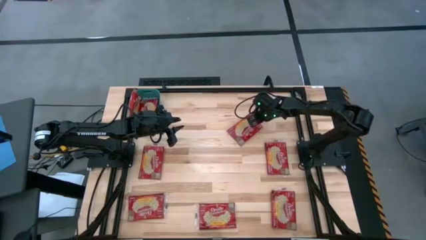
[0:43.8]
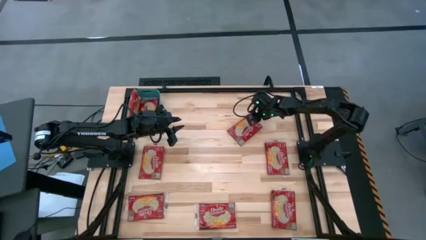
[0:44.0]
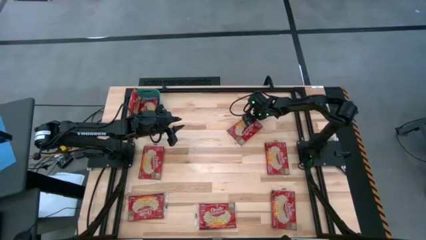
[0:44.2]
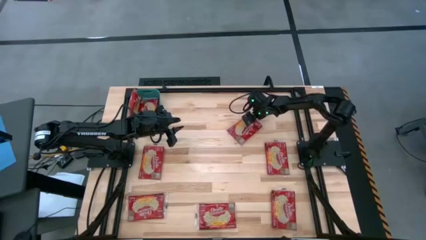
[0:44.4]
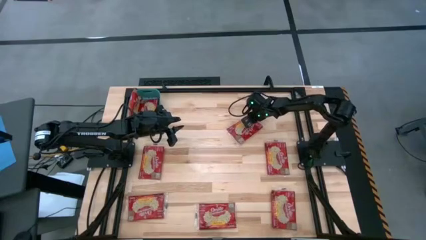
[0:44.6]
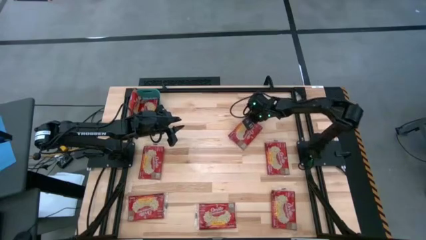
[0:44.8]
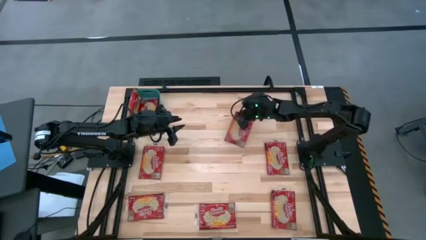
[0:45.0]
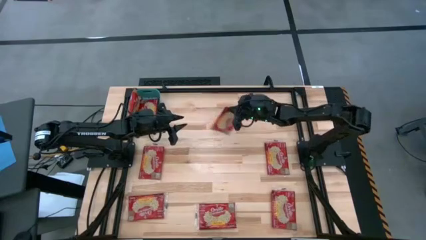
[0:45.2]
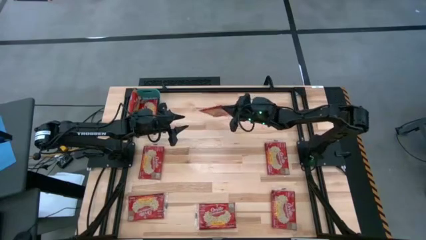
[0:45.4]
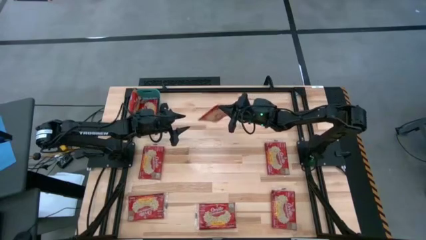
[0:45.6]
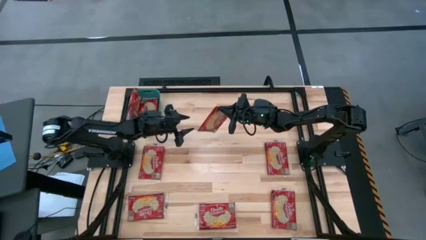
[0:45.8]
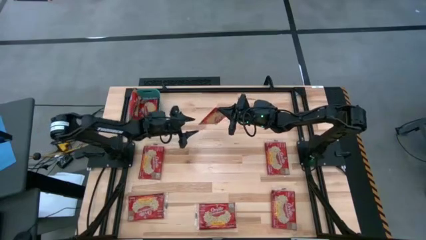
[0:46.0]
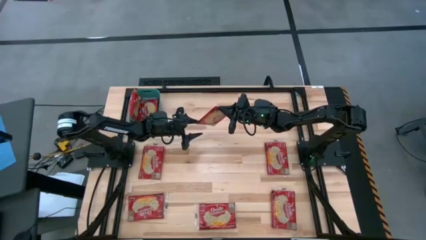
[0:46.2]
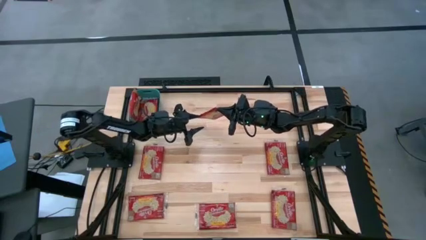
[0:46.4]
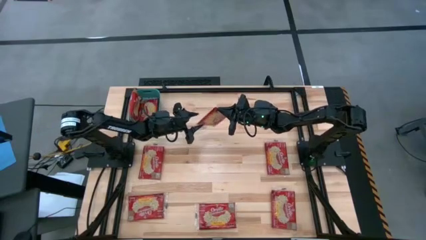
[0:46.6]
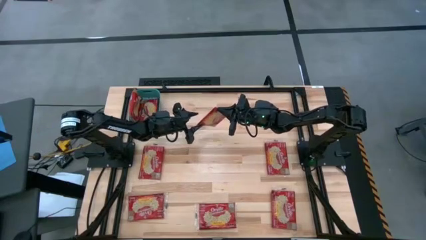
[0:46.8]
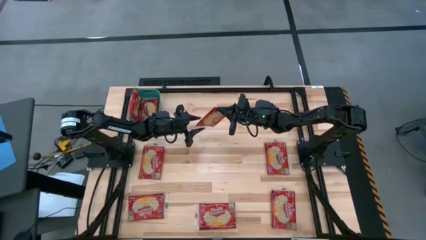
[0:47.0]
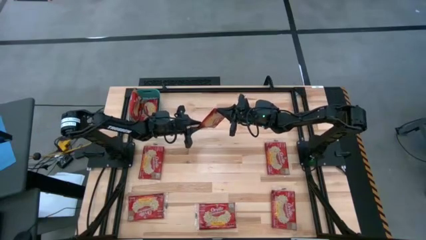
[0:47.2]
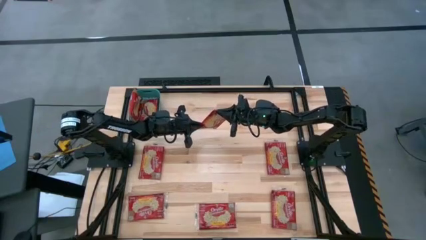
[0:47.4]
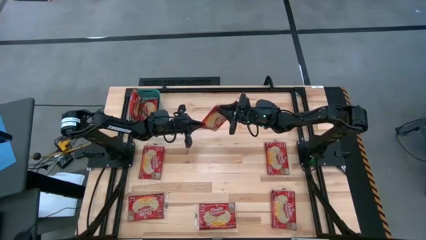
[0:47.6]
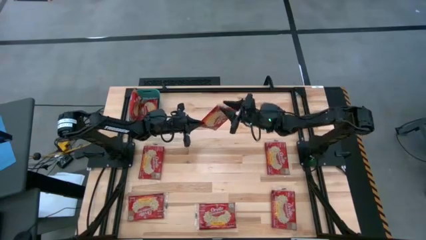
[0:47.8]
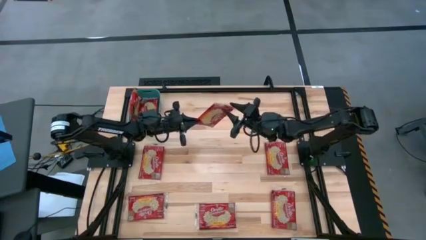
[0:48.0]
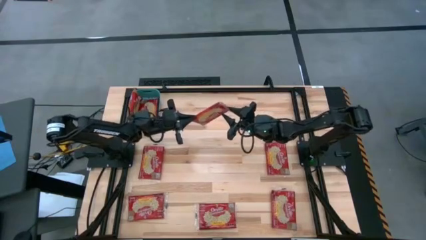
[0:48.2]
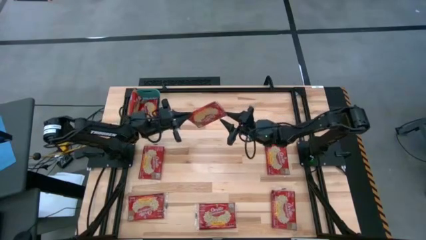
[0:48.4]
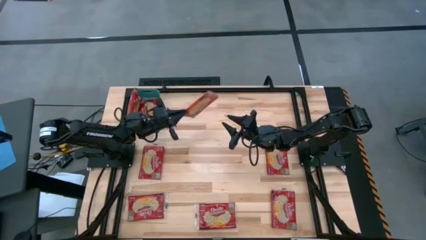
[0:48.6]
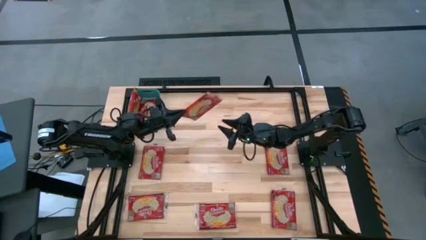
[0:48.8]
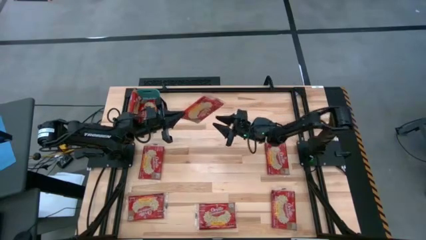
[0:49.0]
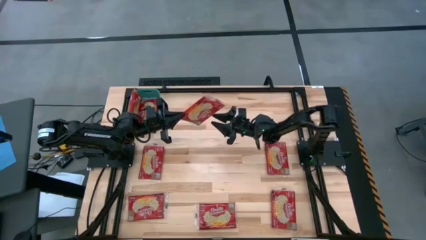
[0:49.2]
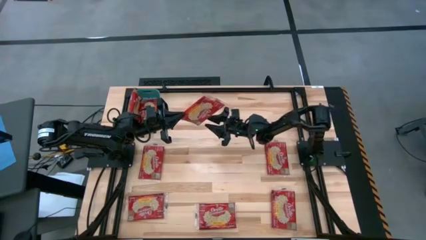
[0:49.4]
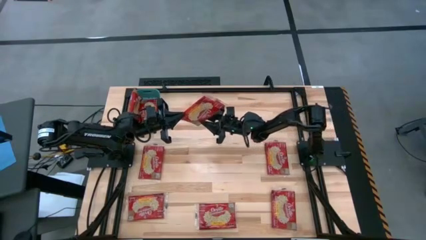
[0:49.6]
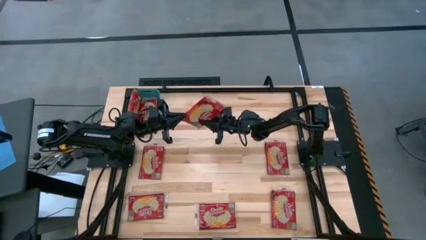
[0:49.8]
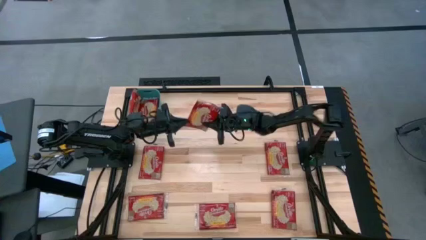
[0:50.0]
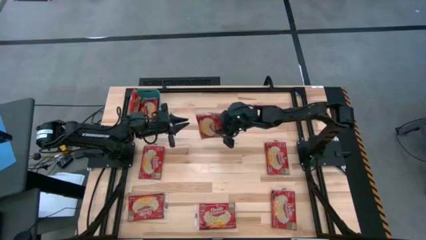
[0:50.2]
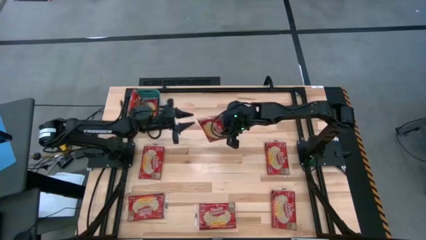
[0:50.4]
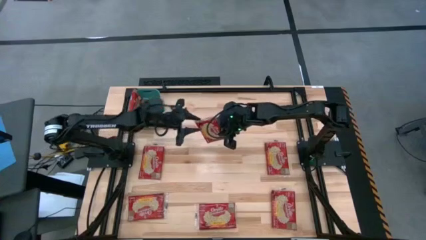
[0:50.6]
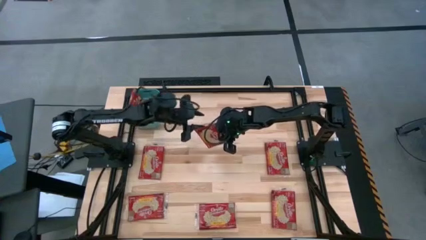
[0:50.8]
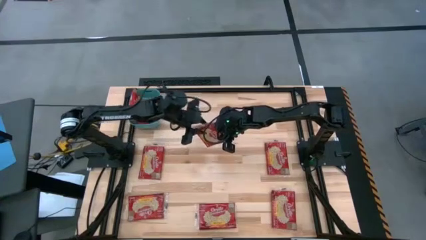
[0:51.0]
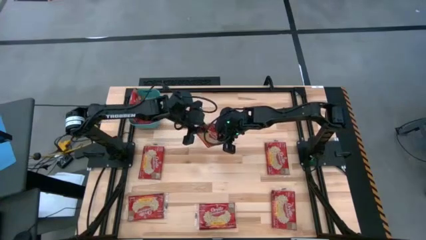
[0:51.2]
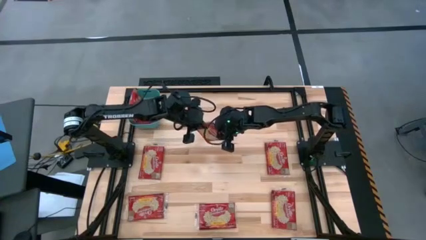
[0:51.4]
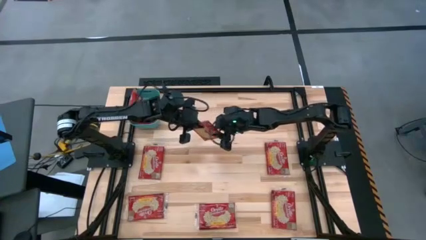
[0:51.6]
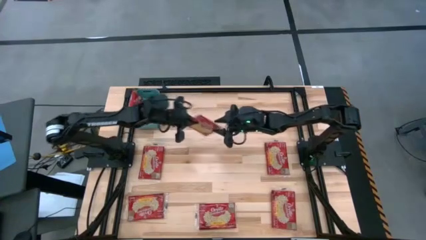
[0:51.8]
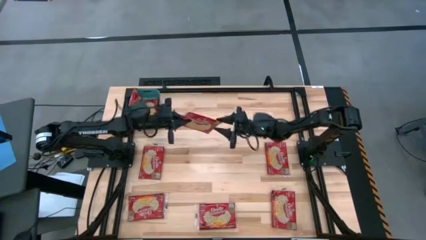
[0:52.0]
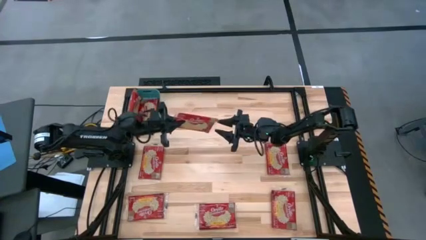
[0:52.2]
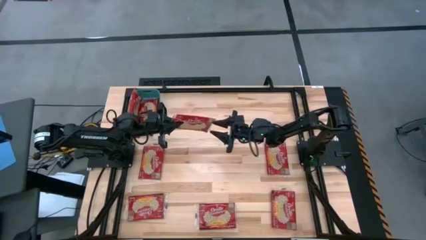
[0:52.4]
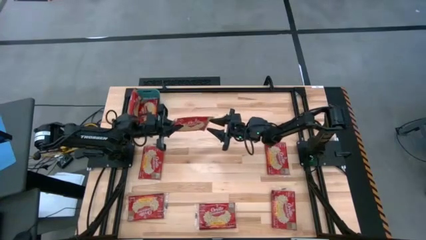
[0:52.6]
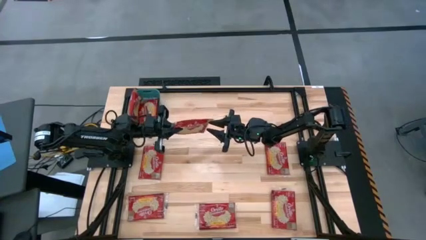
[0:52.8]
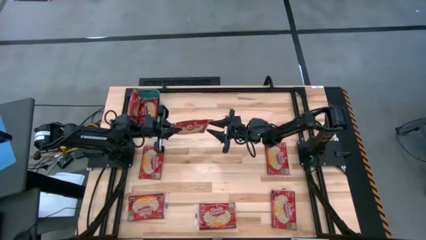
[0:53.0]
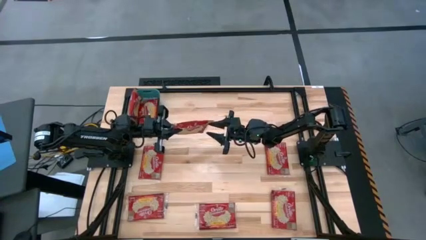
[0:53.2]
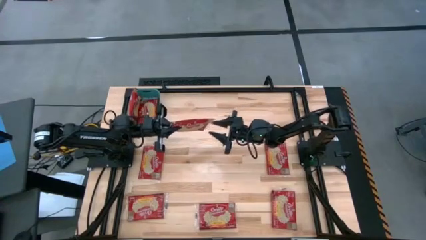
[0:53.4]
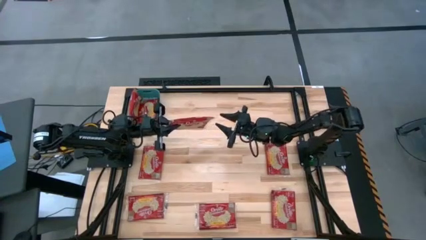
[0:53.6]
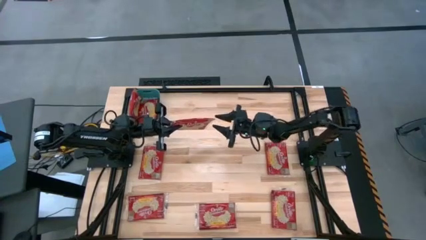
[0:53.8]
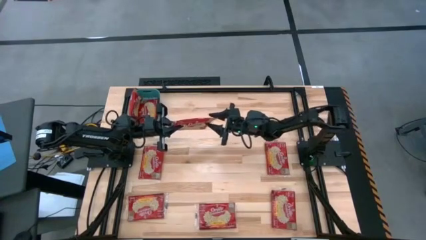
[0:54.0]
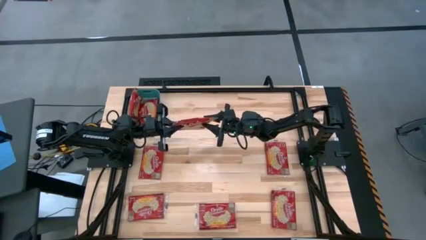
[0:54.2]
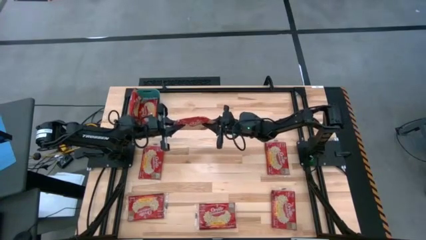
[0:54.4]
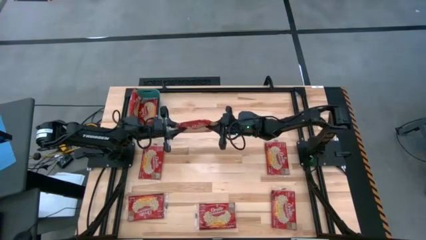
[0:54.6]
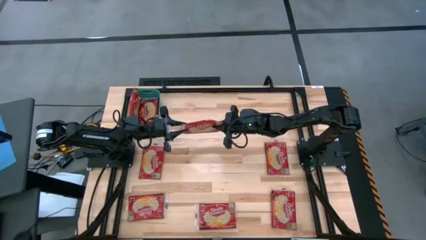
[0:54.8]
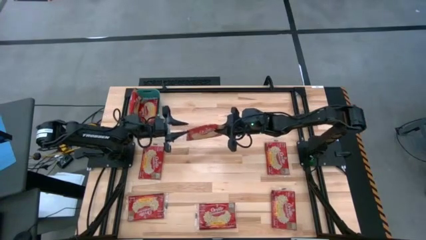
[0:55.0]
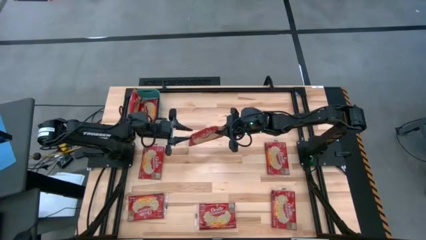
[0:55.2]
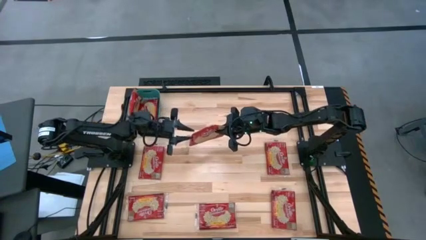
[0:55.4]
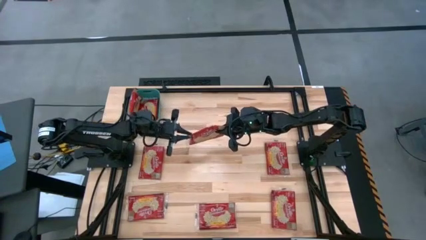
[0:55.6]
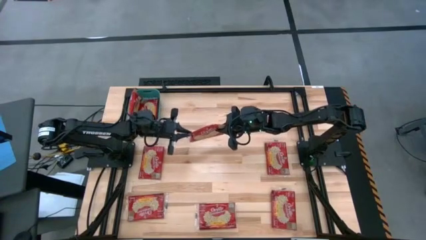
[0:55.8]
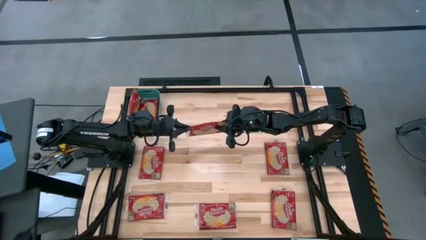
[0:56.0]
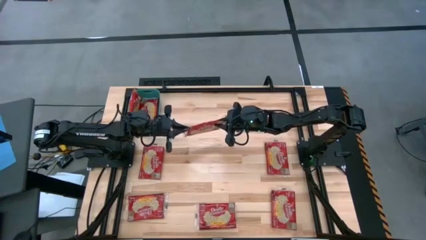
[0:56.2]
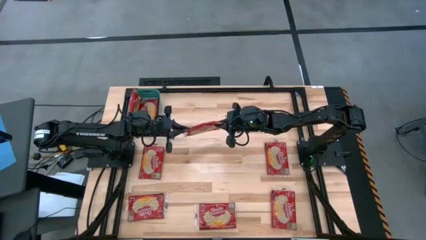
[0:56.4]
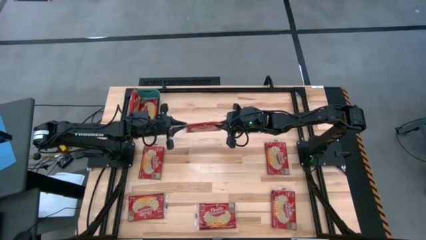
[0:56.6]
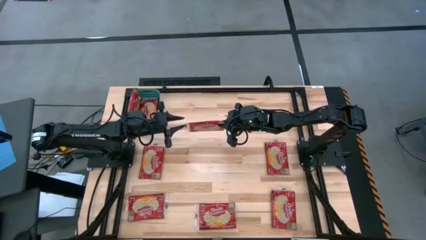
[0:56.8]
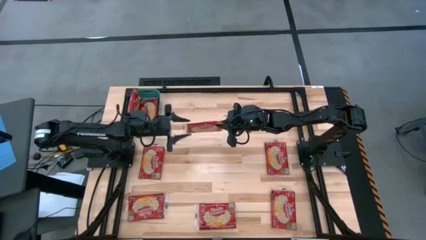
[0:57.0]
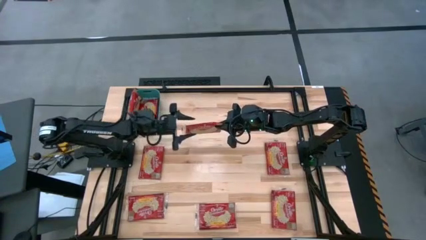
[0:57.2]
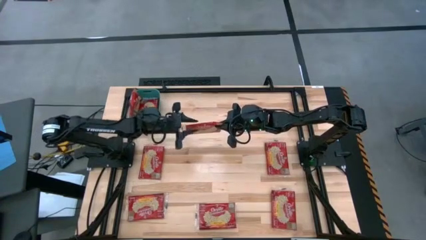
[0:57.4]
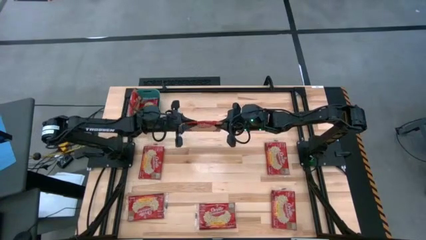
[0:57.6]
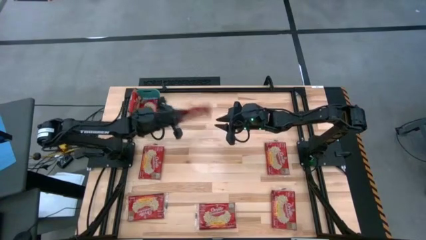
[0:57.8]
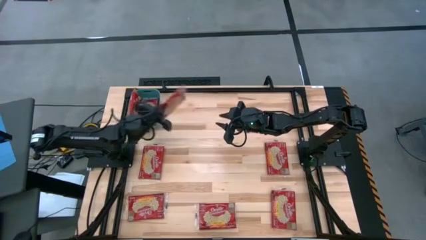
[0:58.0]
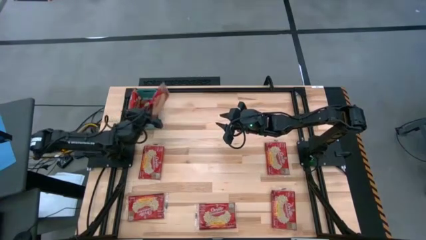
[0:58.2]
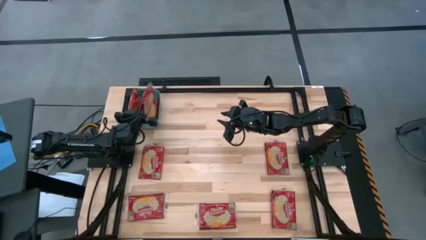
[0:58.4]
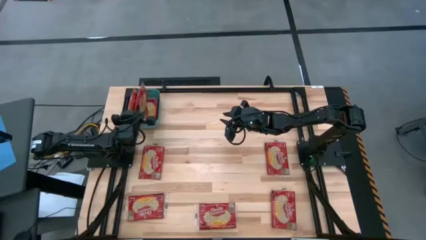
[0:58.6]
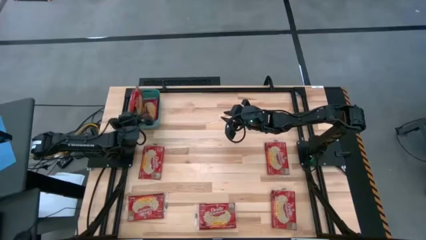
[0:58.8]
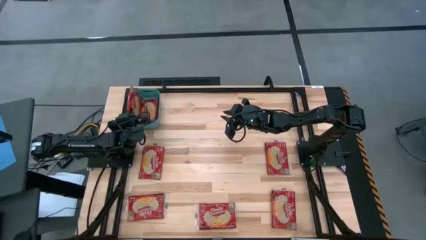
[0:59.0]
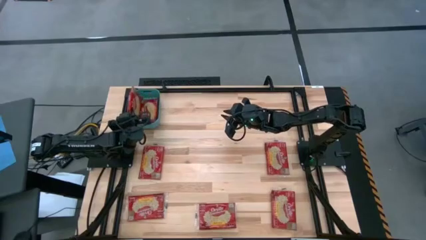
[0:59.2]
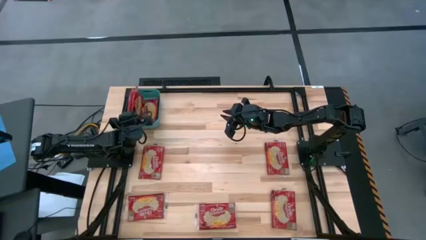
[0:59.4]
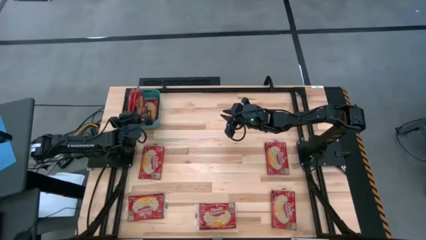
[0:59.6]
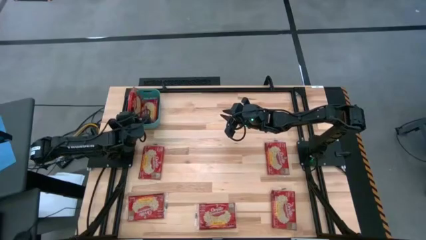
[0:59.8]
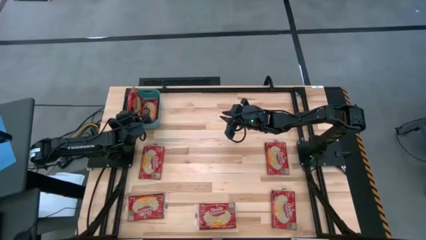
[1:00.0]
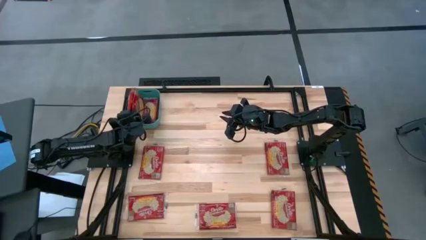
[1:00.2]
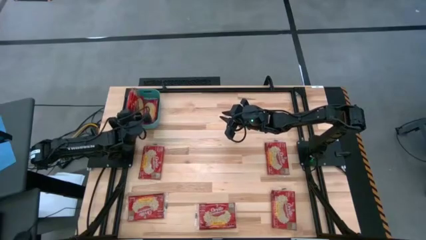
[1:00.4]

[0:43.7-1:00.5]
Task: Sort popcorn bags into baskets
Put the red popcorn bag in the blue bin

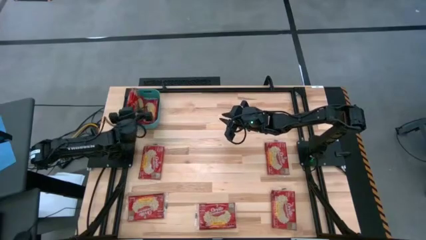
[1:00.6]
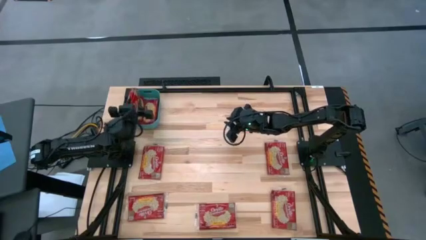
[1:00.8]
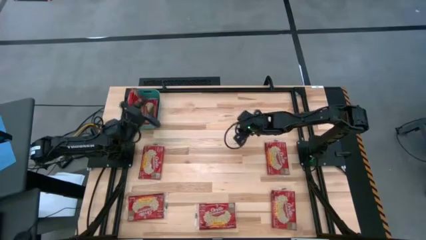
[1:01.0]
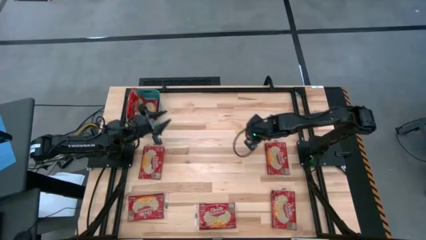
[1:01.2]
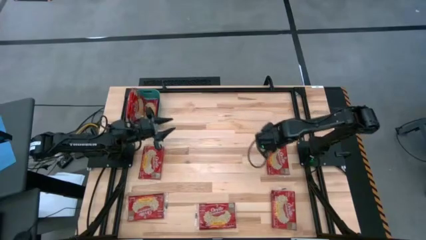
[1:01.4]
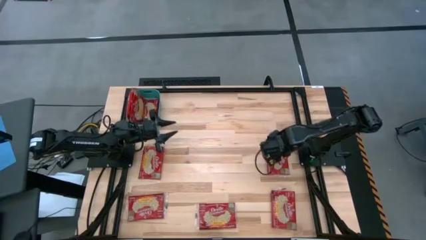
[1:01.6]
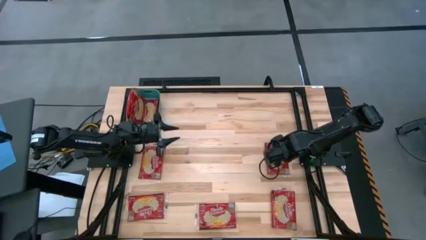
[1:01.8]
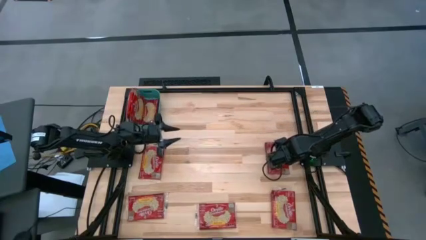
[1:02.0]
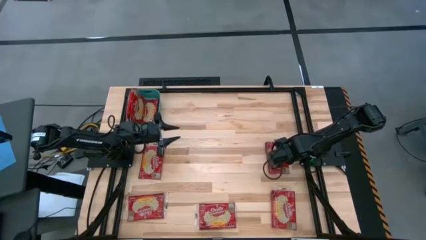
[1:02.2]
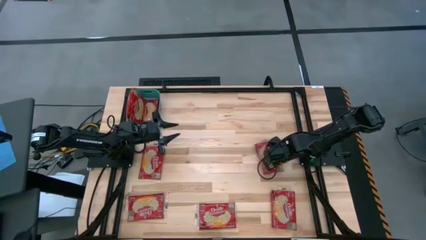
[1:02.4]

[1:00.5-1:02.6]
Put the red popcorn bag in the blue bin
